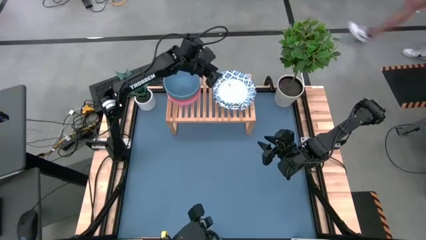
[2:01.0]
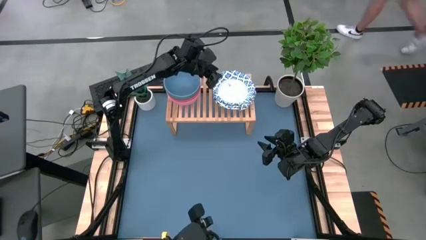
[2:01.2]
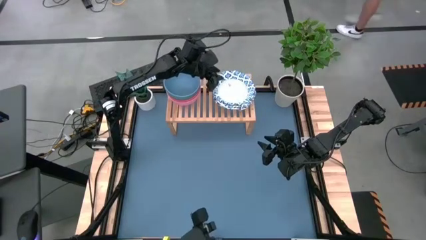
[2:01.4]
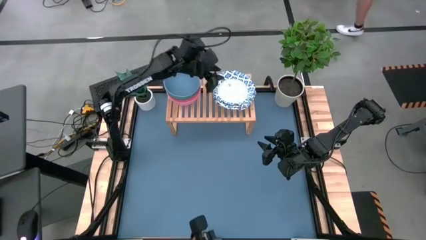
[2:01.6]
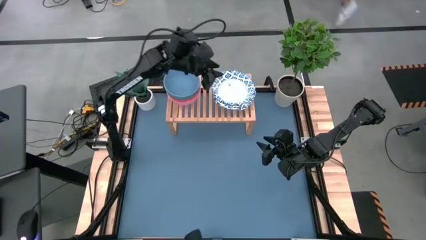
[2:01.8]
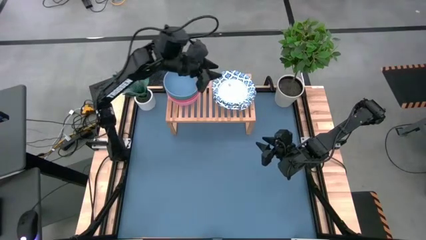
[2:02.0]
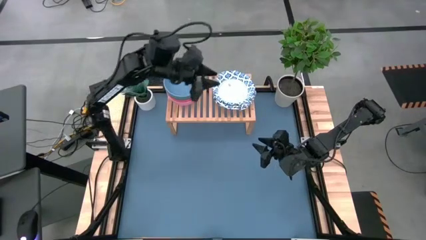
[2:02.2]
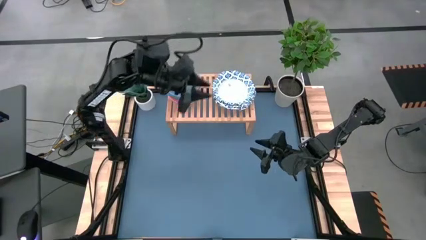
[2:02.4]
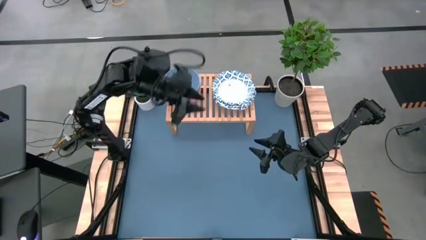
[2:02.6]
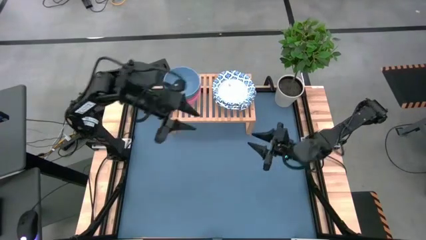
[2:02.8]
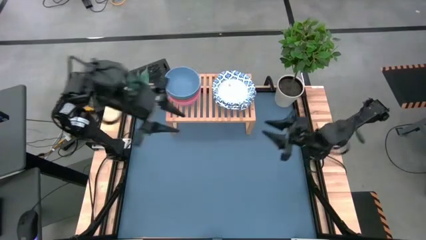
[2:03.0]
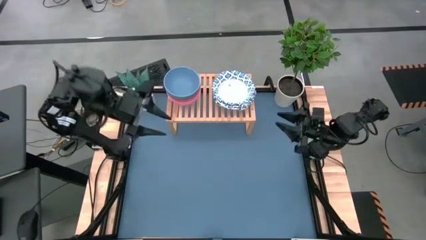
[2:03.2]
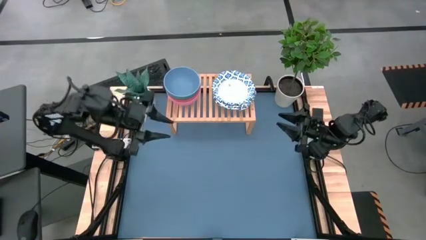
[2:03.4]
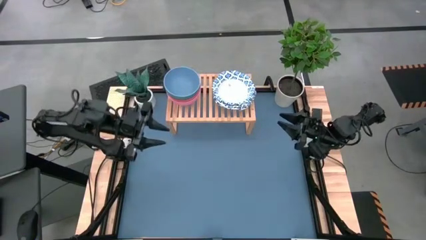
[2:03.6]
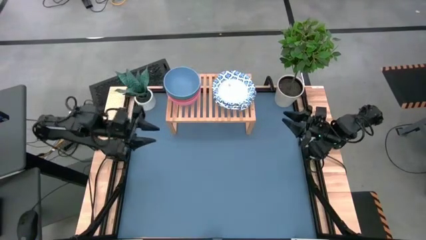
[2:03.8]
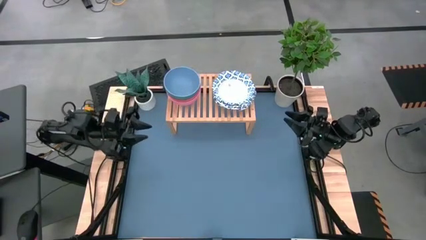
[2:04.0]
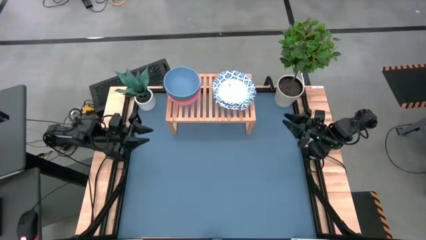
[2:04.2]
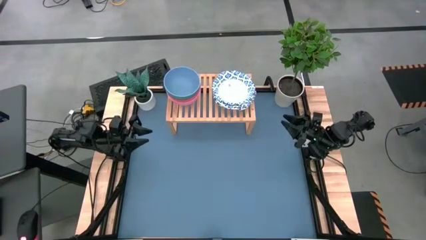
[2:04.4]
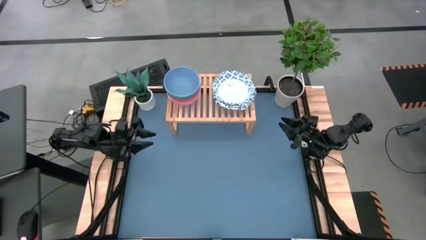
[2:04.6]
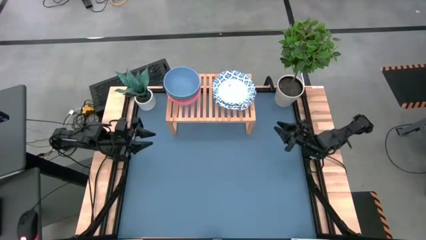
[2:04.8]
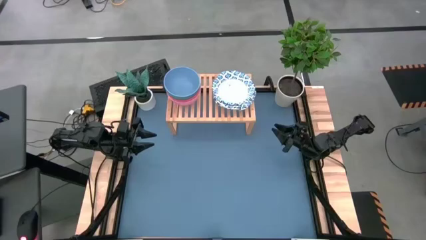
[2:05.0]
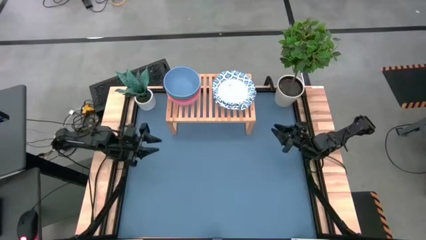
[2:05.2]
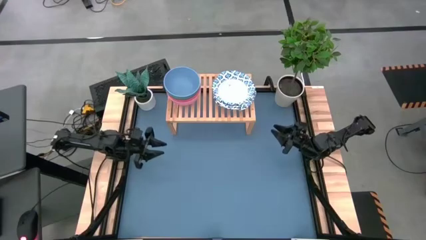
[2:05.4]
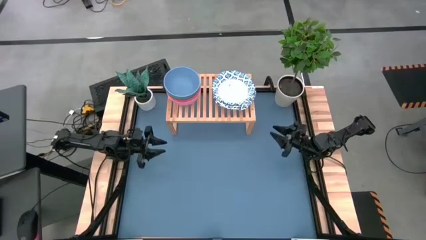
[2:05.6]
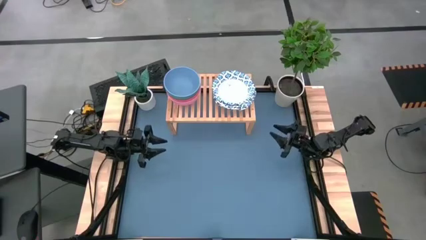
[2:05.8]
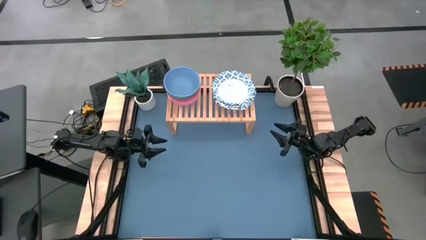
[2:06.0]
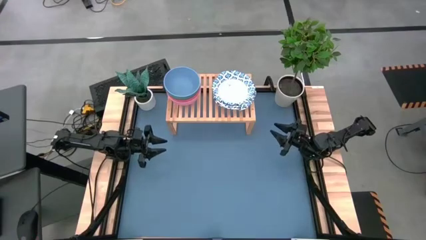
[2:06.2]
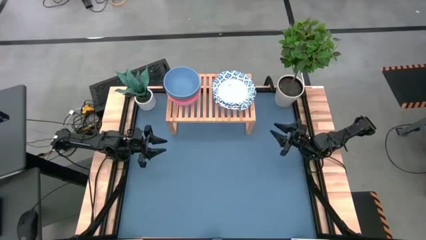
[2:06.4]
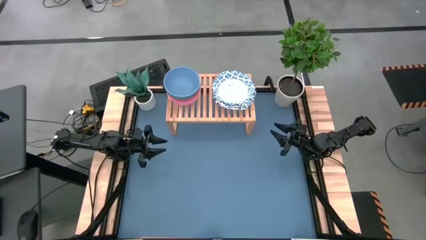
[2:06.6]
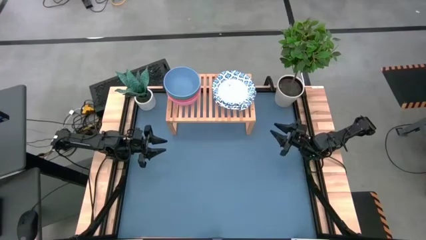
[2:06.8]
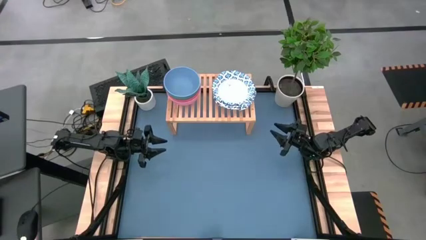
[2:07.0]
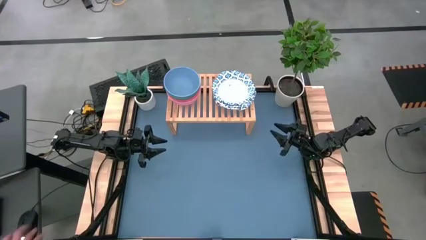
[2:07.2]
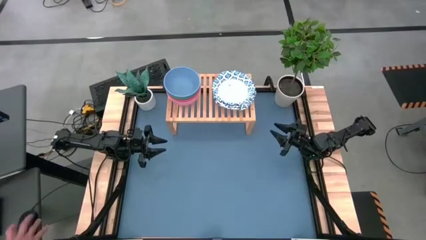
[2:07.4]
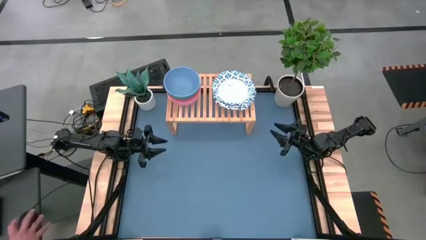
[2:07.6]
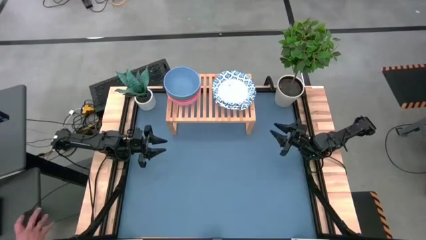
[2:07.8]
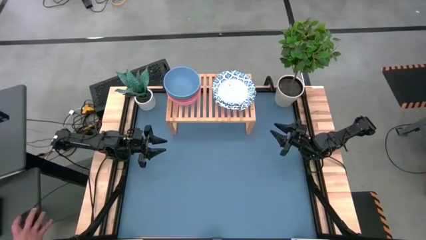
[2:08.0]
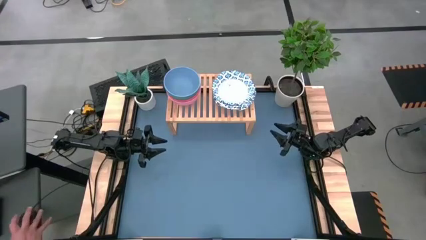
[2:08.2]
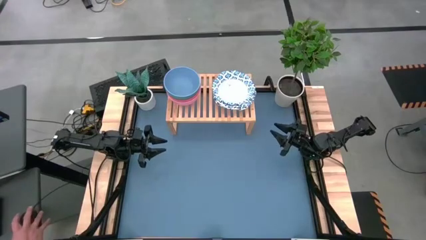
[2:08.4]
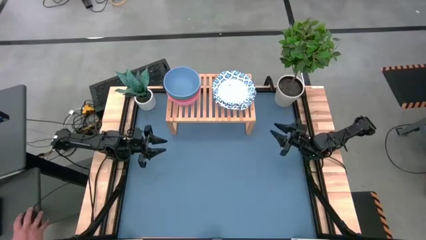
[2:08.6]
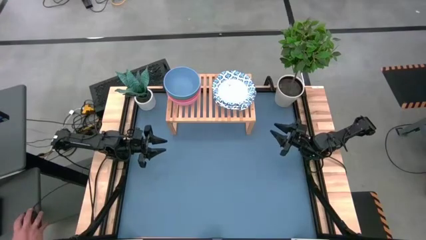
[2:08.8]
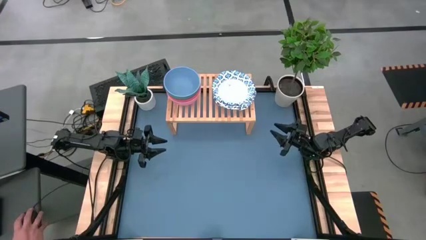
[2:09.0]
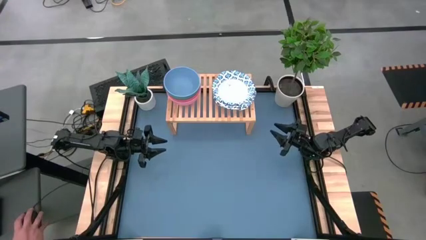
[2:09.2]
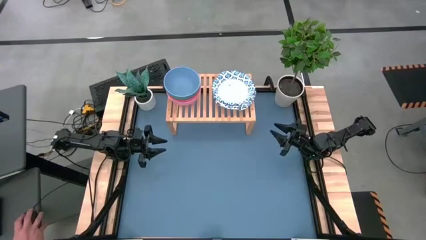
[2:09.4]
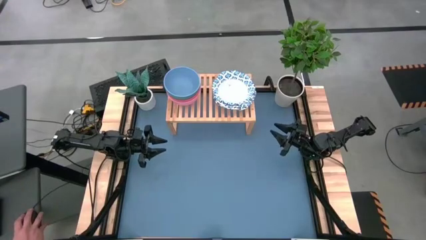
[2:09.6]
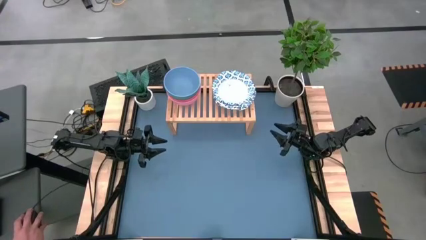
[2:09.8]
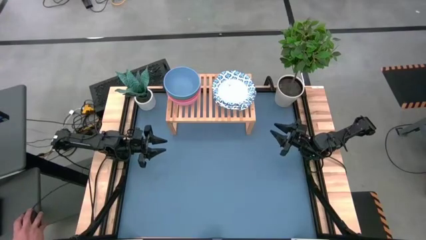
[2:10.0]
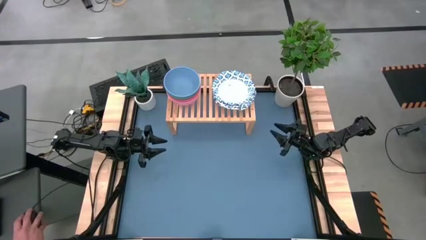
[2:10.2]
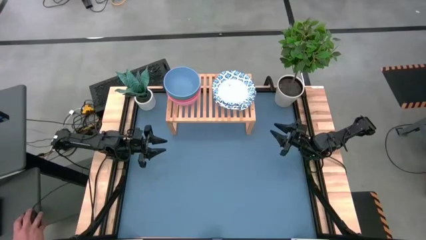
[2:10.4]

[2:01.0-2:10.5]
Task: Place and stack bowls onto a shelf
Return to Home Position

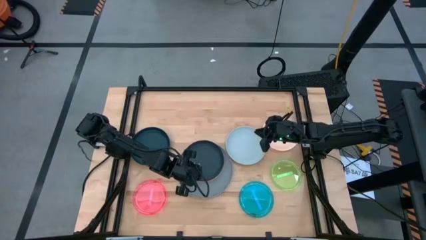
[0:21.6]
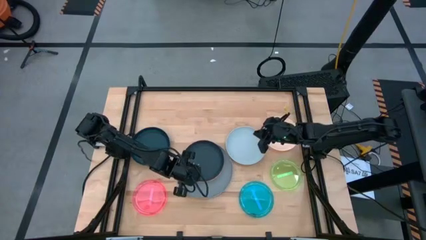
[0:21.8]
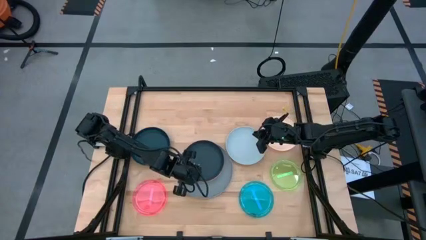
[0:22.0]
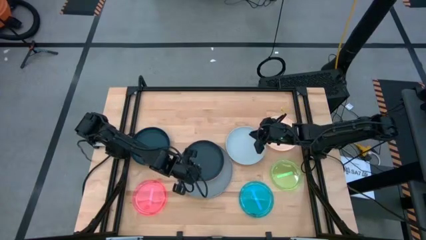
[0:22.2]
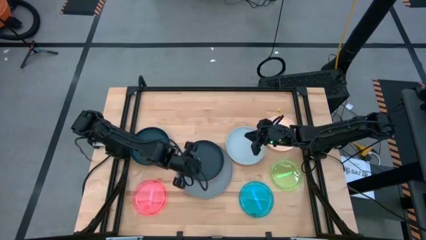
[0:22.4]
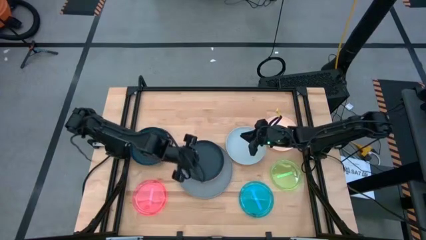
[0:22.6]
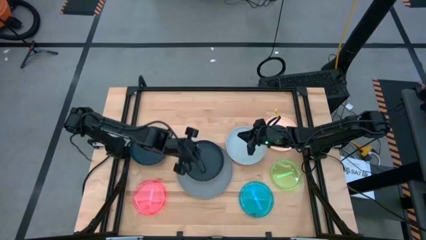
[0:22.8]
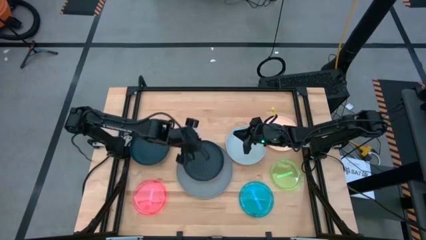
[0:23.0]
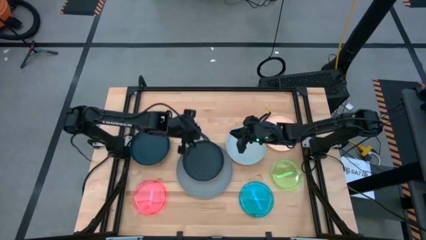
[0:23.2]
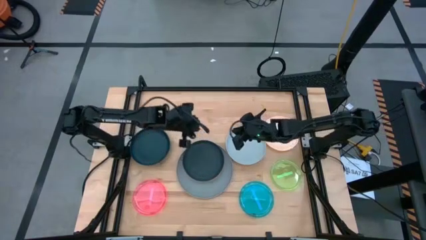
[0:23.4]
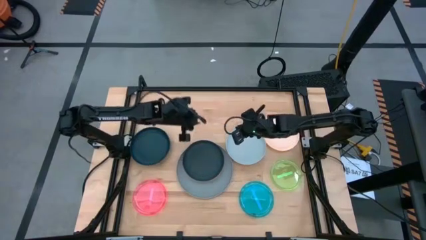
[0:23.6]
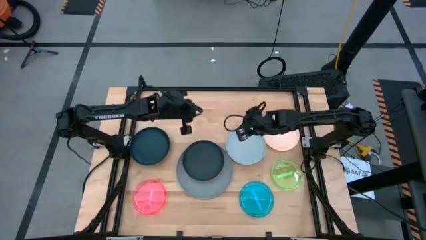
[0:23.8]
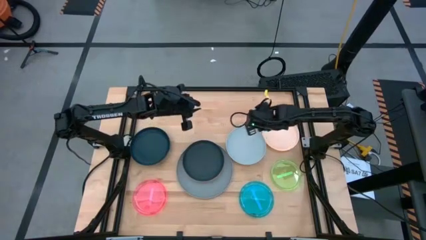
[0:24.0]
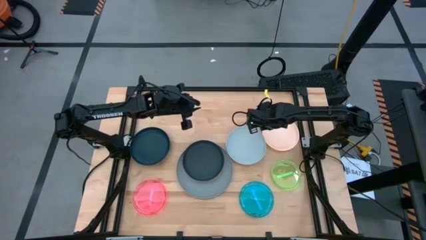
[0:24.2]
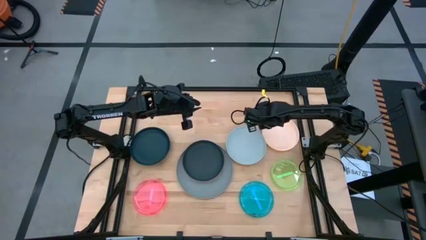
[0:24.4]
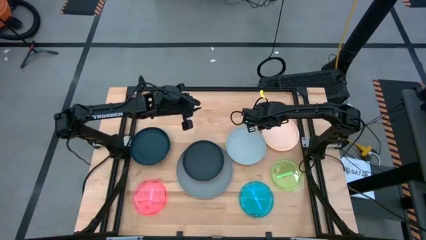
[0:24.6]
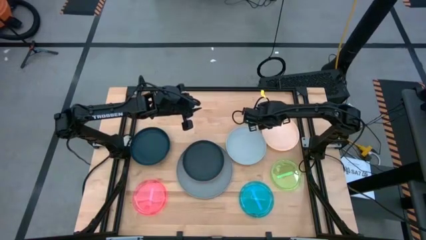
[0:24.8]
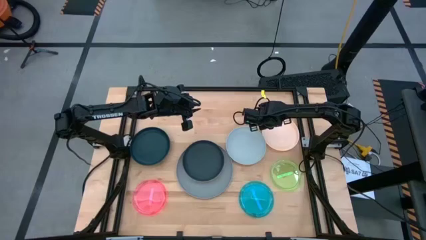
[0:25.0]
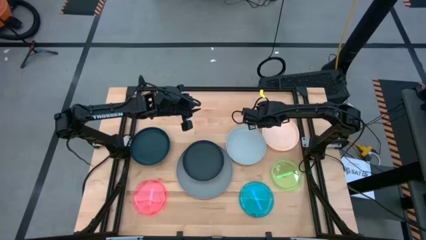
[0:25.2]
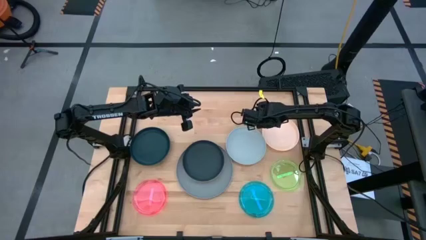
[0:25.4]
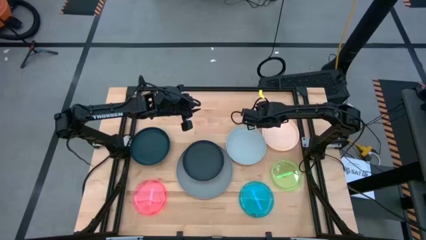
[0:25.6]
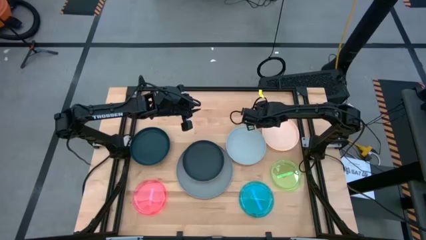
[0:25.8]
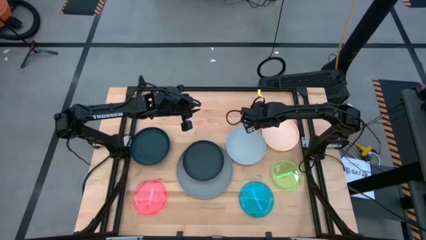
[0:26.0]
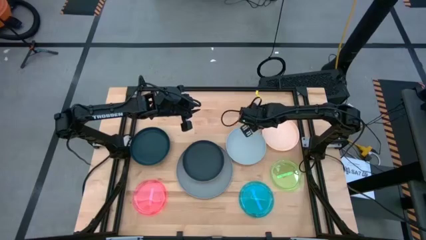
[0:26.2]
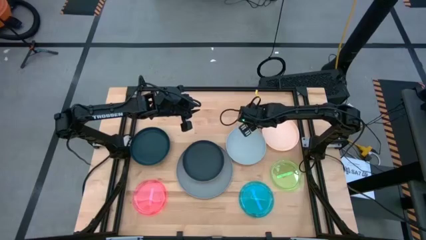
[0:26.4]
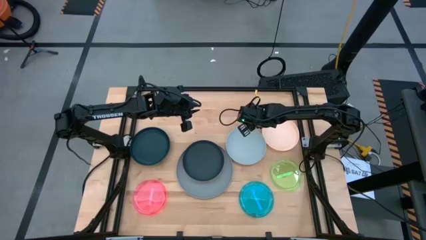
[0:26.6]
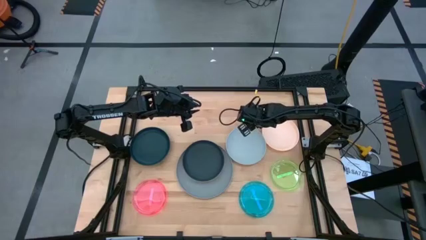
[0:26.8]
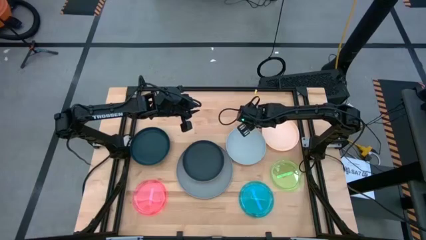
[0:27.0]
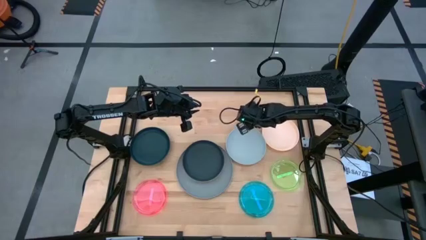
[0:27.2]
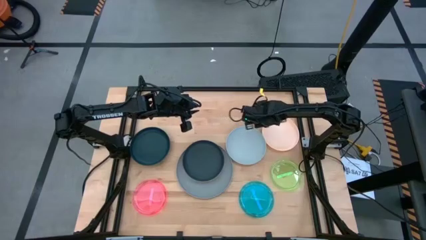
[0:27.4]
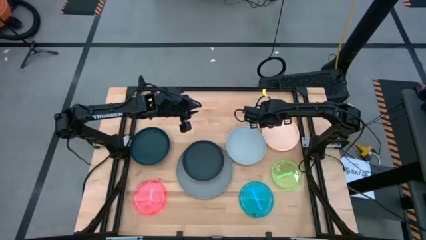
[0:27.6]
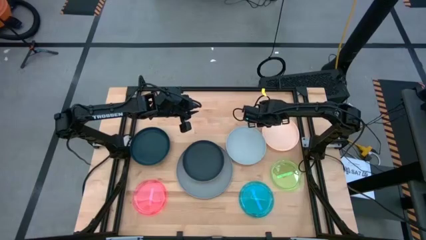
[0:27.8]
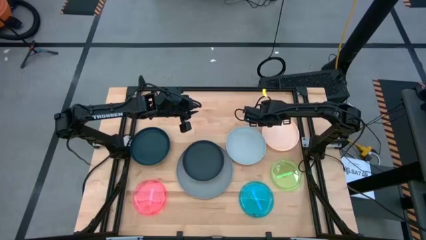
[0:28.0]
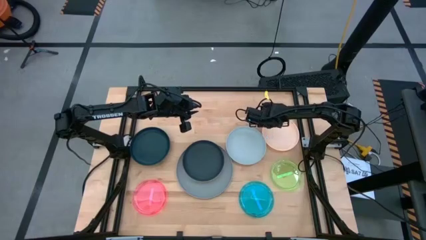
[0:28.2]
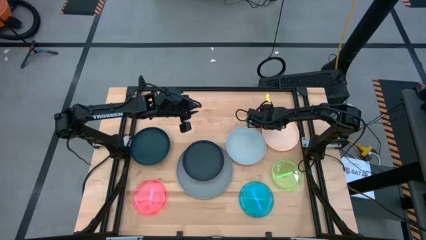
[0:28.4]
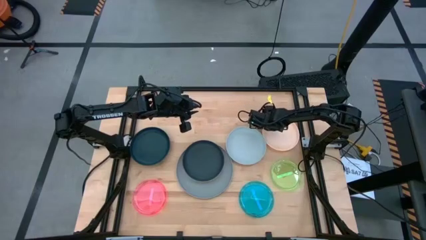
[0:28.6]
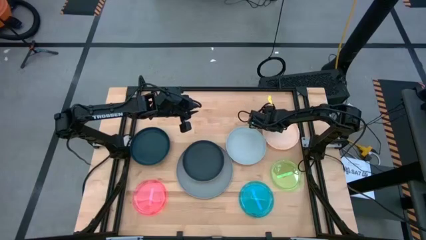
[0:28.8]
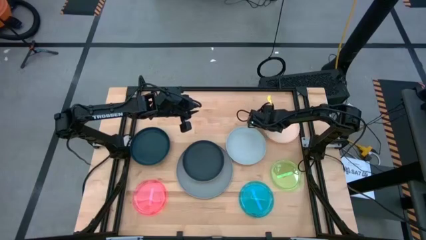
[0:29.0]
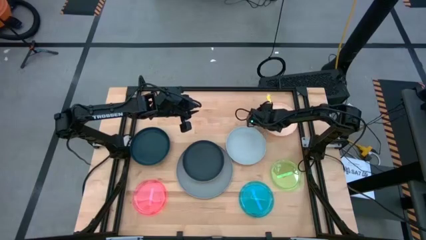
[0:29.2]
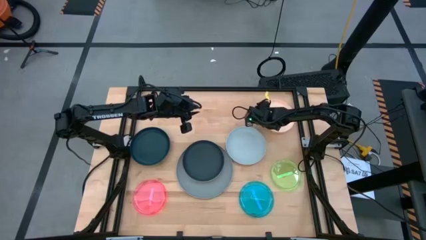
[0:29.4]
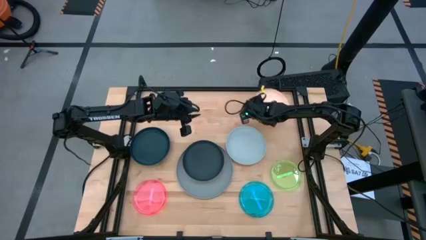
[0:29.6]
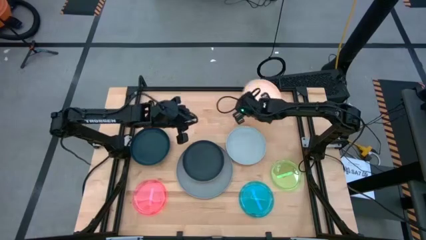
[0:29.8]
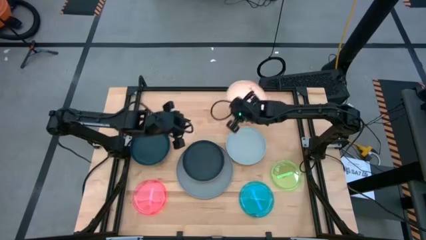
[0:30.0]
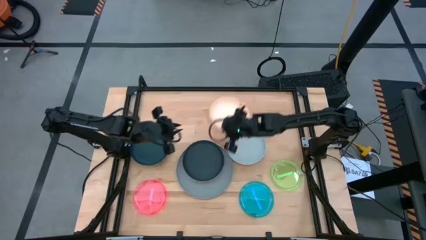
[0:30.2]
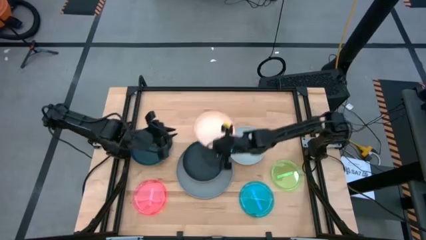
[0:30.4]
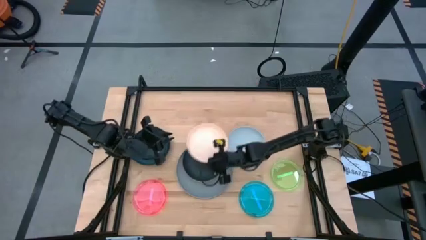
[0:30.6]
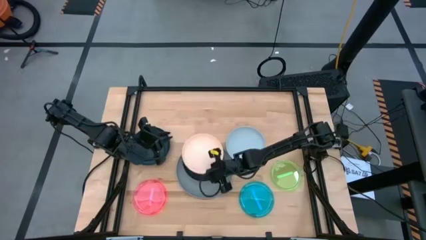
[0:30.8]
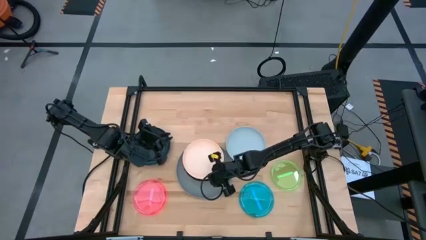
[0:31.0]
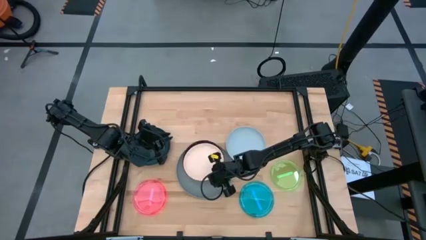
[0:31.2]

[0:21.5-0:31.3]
Task: Stack plastic plates
Stack the orange plate on top of the black plate
